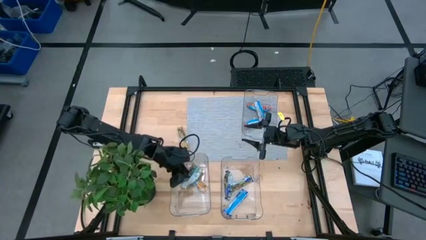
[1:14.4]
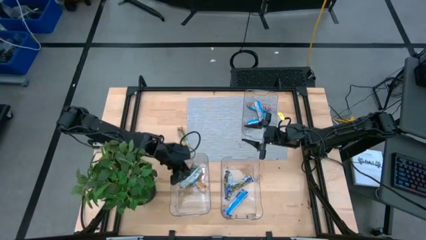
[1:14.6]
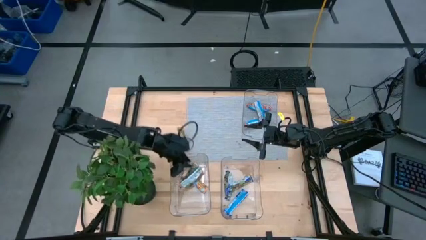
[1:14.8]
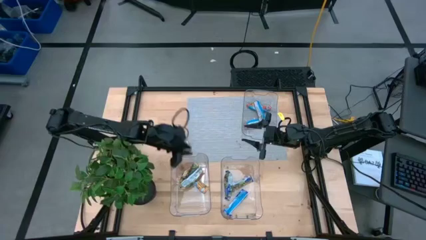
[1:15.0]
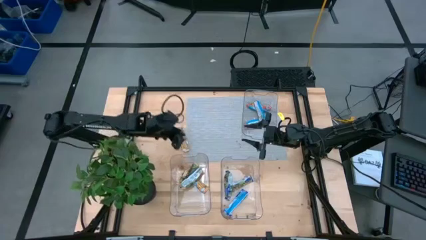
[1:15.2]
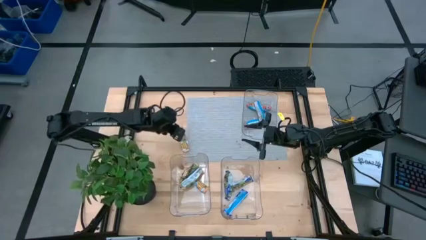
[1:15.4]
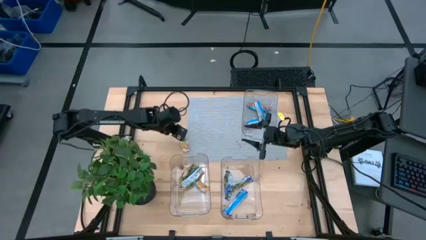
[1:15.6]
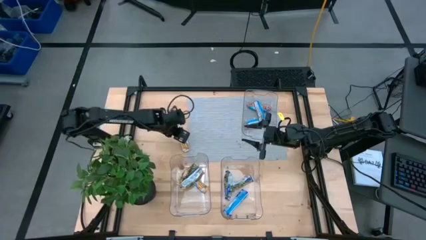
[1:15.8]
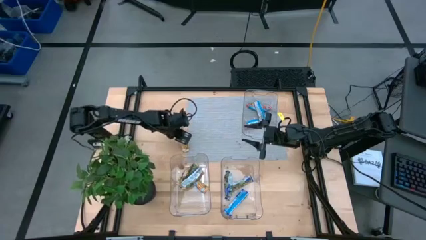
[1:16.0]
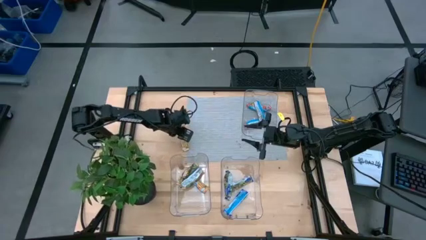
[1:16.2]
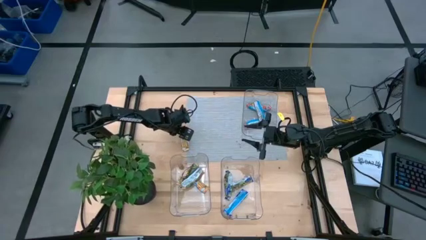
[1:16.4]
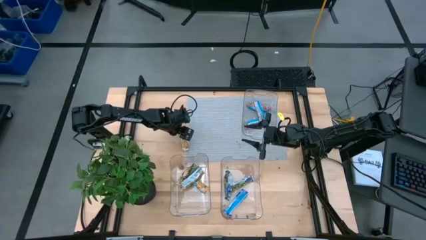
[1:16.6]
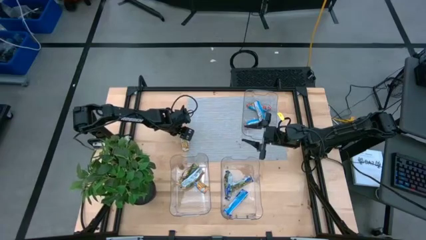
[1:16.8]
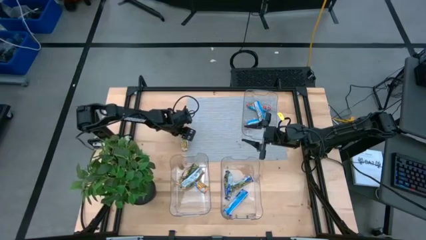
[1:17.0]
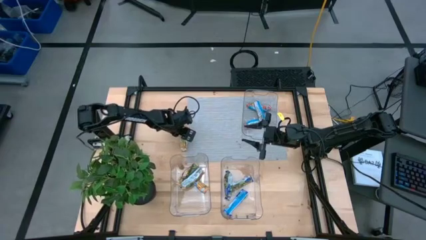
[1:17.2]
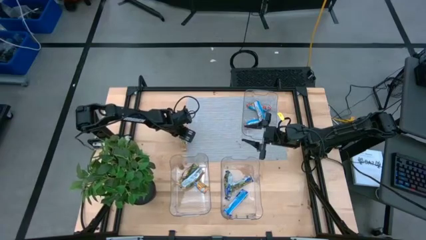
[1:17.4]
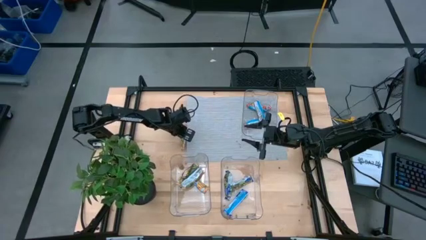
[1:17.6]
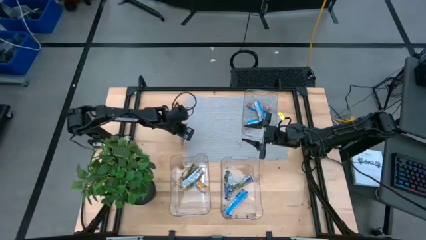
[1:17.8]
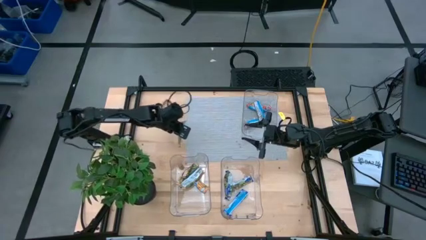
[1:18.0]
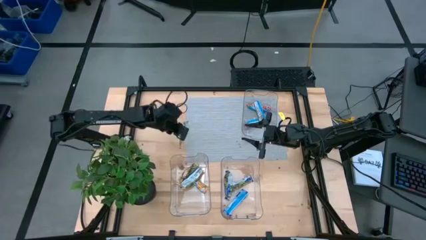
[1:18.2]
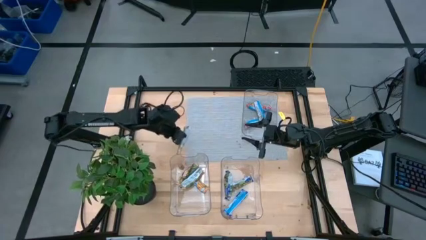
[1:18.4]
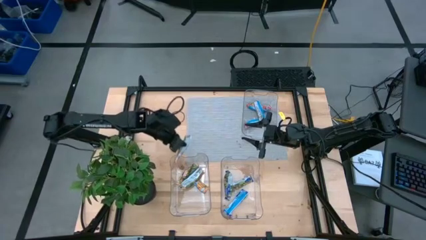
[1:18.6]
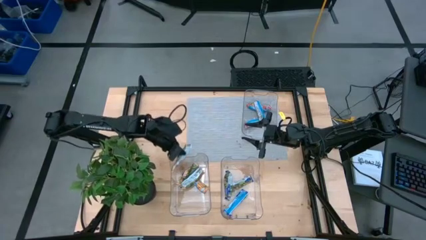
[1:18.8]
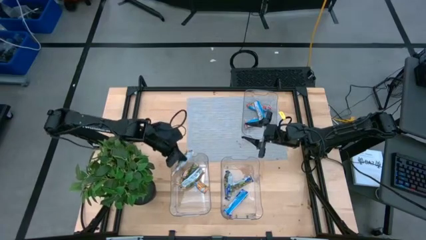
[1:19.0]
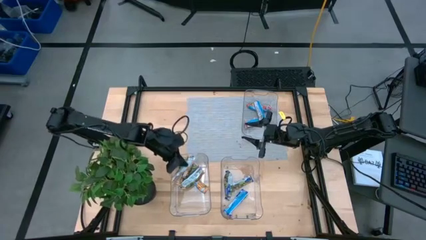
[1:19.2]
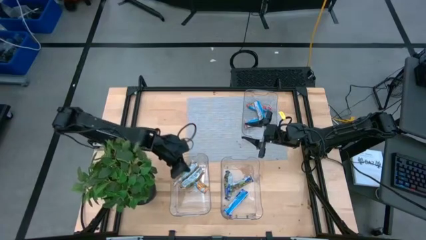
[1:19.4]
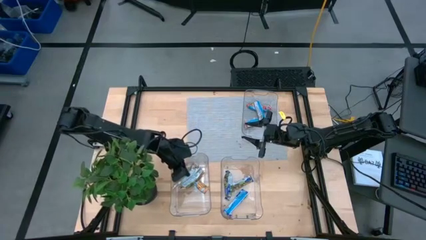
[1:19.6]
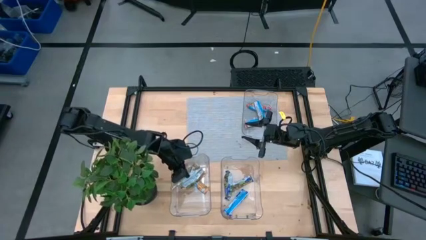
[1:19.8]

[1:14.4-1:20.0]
Task: Pick and place Granola Bars by type
Put the yellow granola bar into the bottom left transparent bin

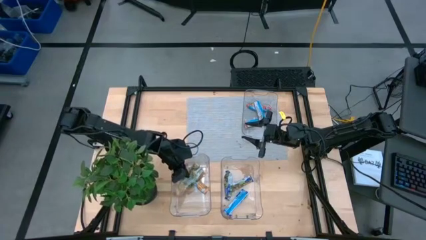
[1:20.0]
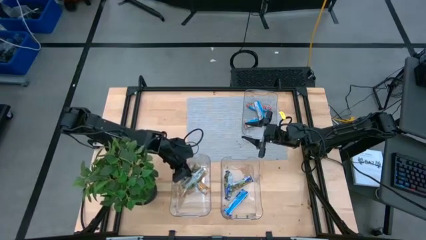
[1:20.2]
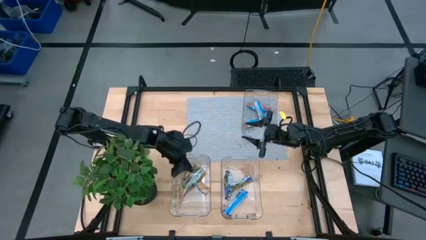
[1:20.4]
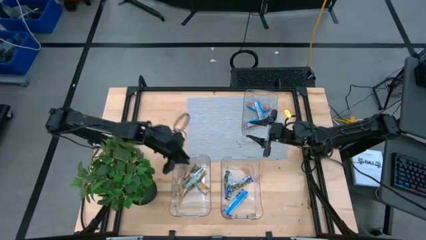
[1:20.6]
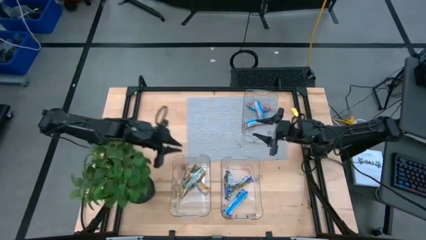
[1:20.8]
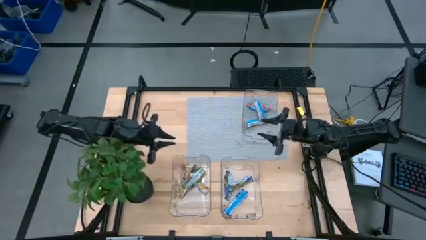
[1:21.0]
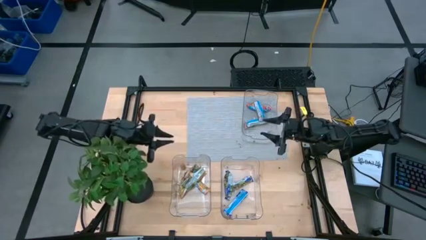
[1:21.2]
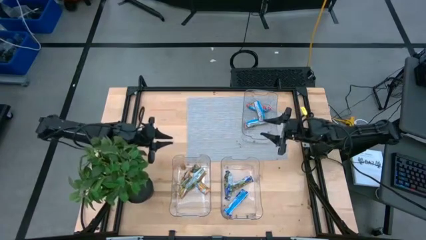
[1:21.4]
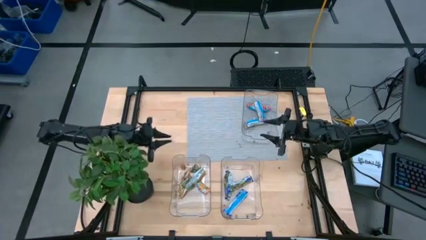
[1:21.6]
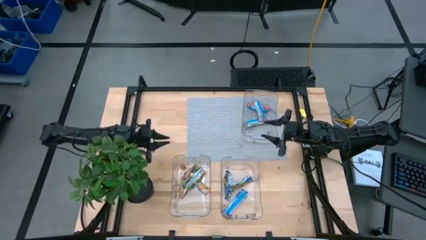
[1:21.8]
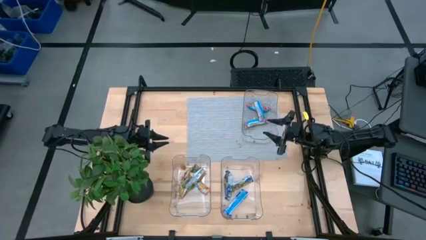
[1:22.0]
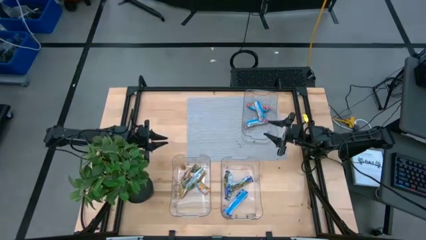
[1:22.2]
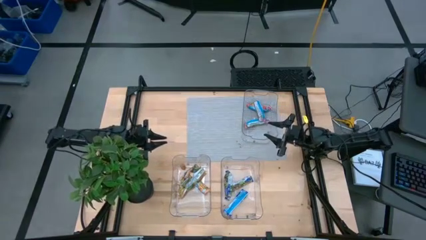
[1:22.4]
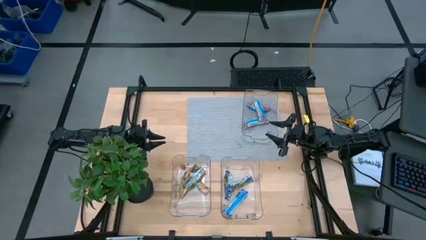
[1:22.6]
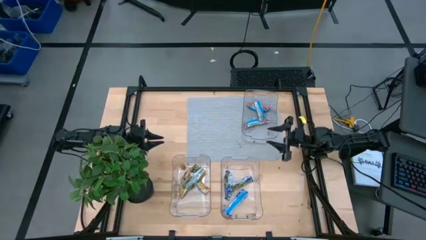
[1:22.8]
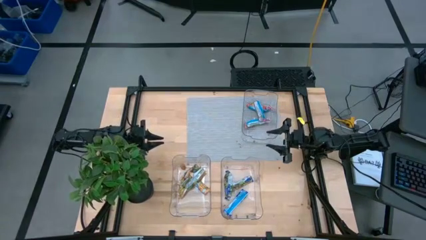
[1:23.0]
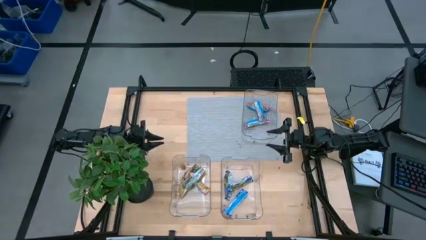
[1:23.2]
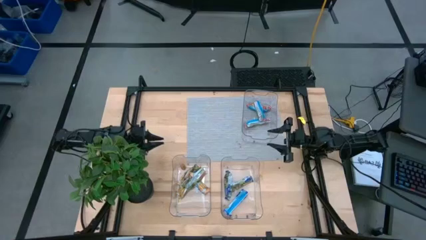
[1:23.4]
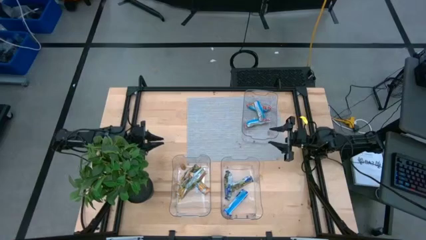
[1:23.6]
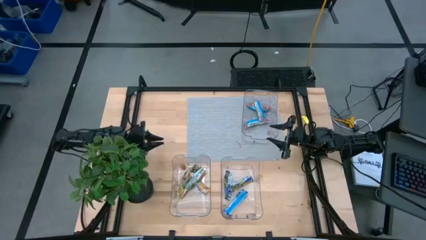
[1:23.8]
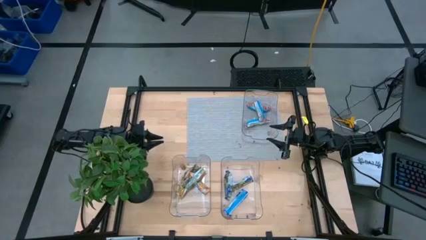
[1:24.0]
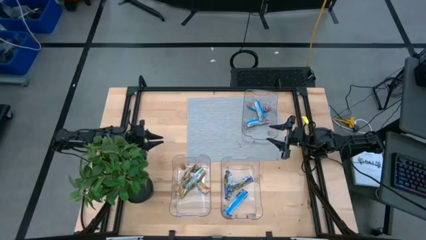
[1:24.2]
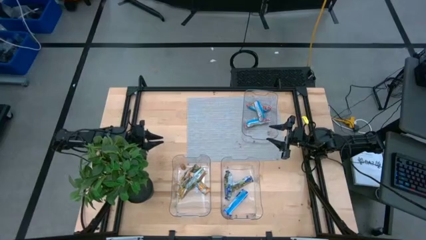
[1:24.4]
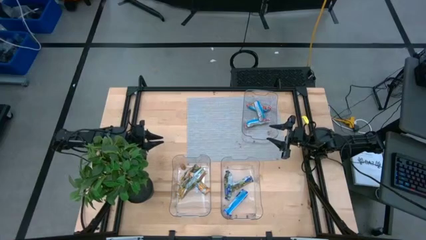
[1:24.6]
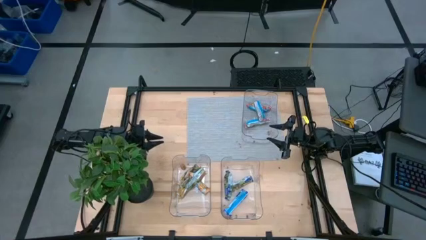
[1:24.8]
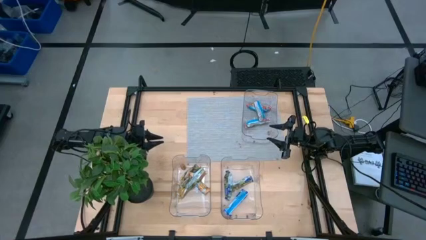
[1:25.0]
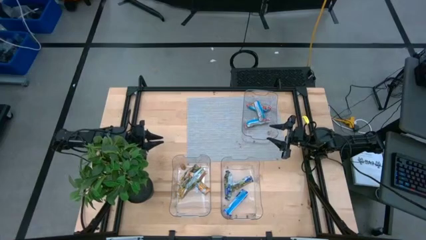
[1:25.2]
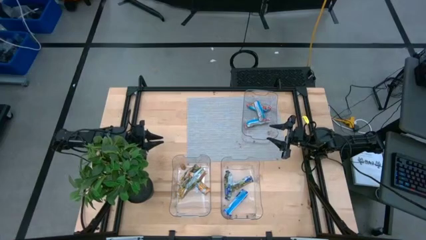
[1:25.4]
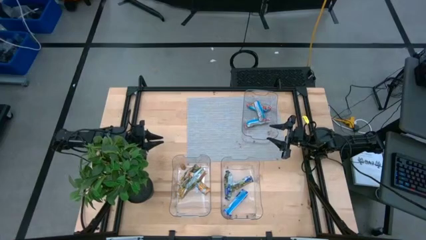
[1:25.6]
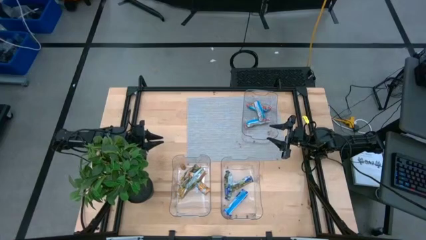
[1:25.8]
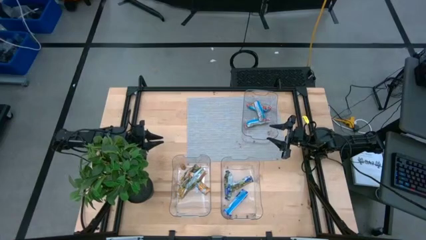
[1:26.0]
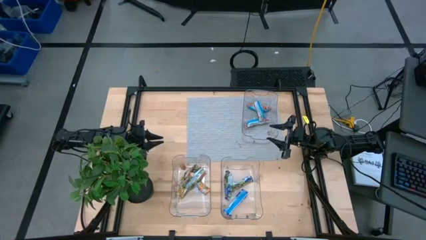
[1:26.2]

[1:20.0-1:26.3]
Return to Home Position
